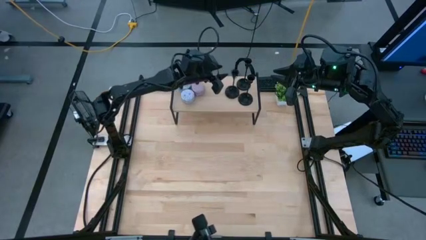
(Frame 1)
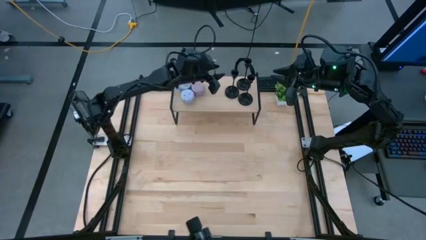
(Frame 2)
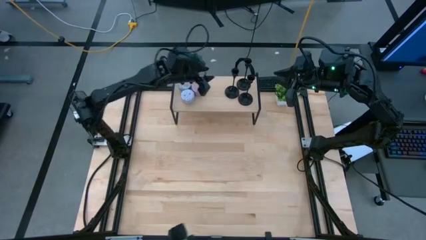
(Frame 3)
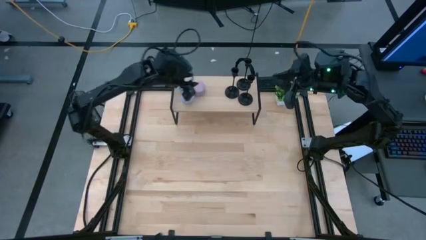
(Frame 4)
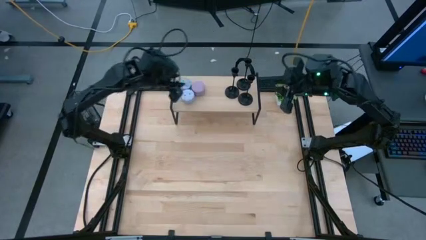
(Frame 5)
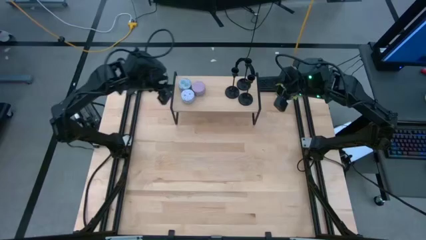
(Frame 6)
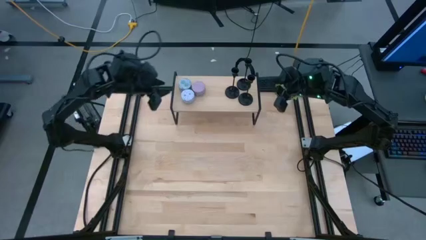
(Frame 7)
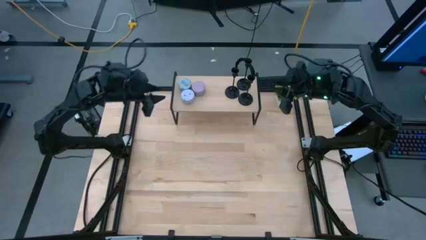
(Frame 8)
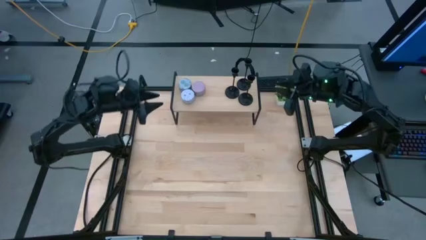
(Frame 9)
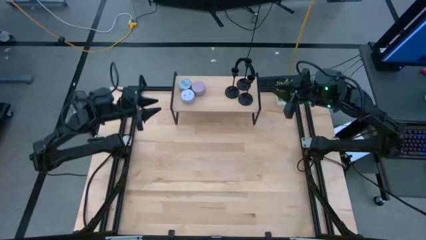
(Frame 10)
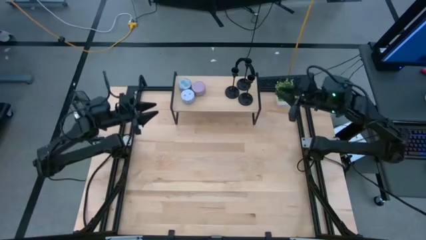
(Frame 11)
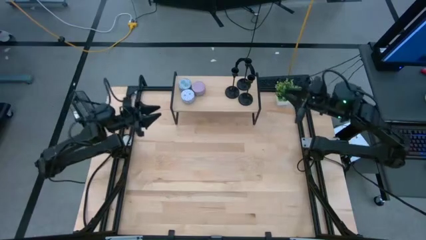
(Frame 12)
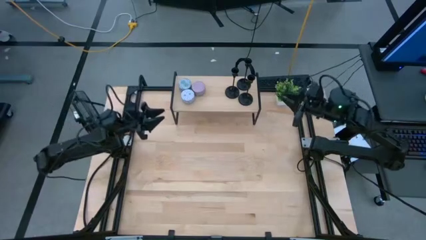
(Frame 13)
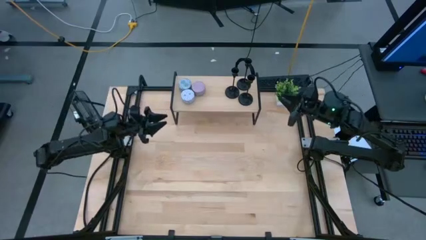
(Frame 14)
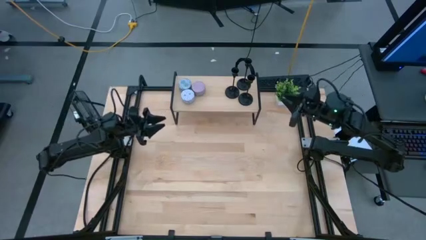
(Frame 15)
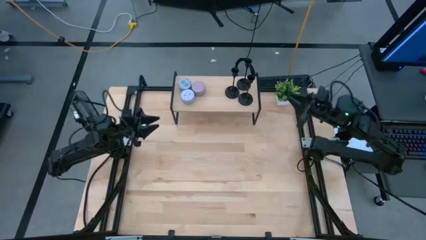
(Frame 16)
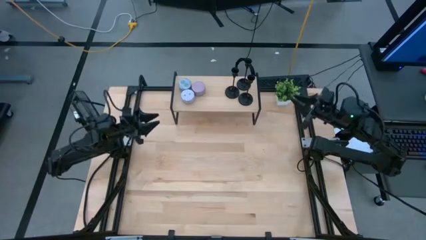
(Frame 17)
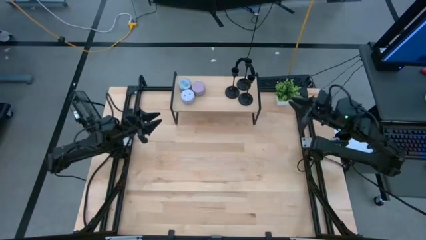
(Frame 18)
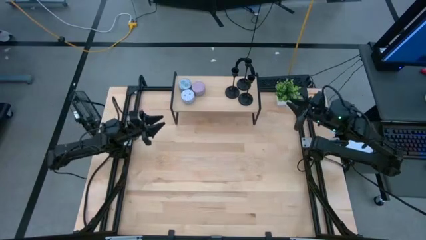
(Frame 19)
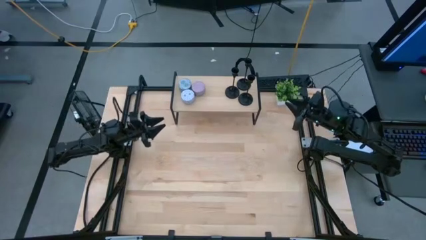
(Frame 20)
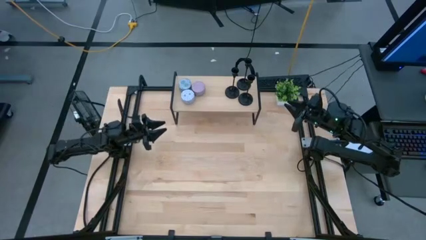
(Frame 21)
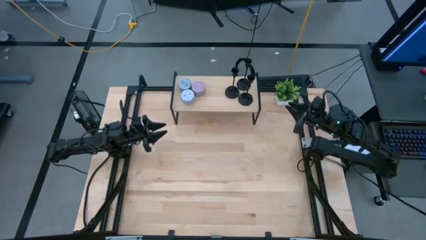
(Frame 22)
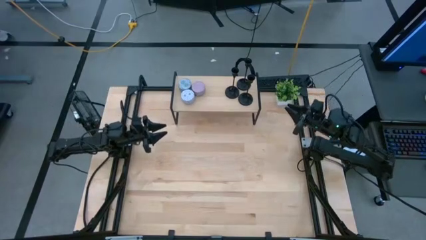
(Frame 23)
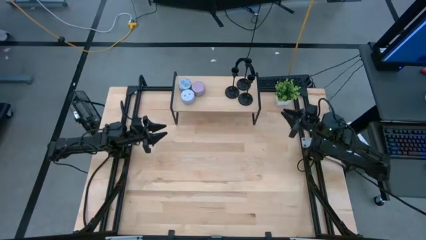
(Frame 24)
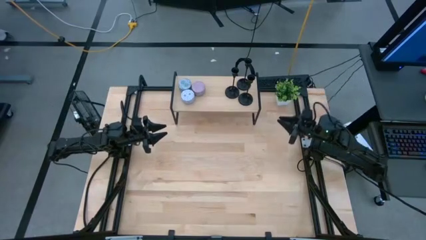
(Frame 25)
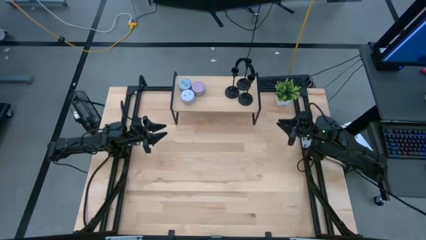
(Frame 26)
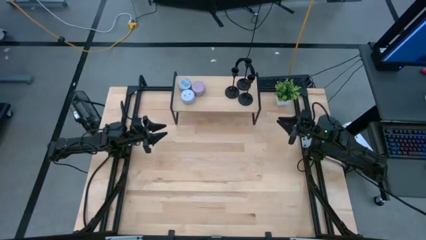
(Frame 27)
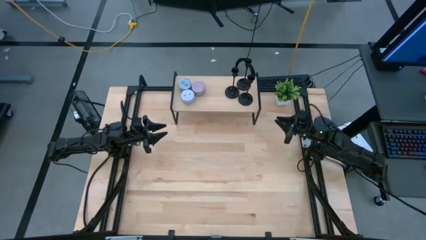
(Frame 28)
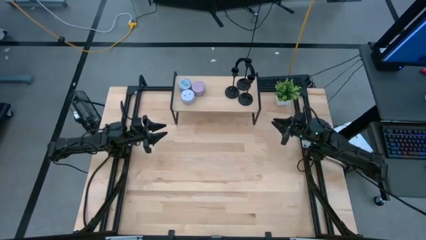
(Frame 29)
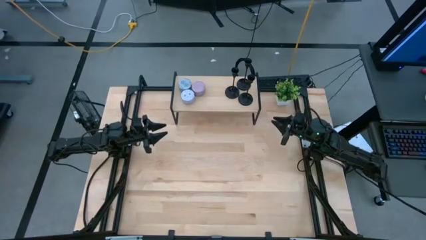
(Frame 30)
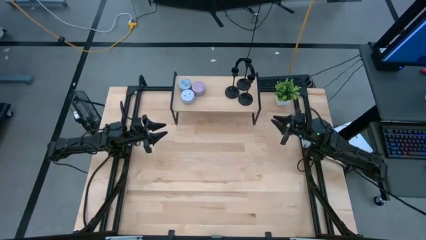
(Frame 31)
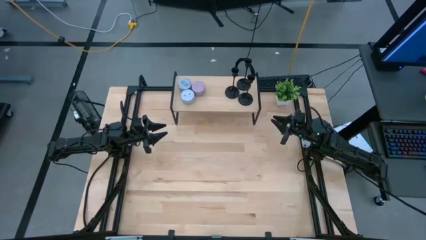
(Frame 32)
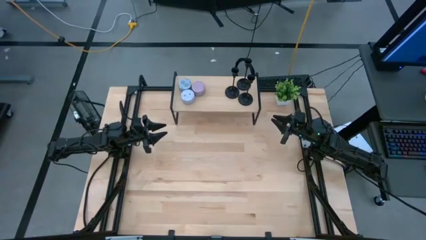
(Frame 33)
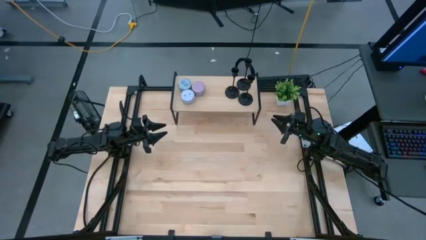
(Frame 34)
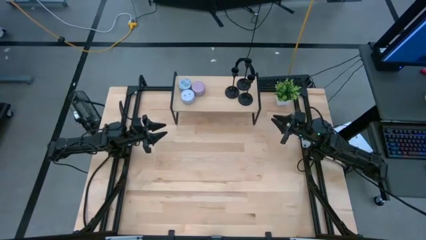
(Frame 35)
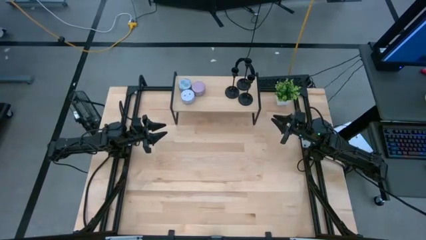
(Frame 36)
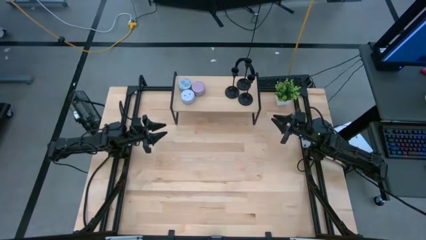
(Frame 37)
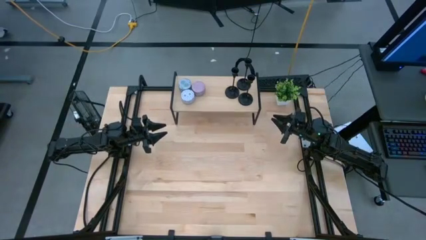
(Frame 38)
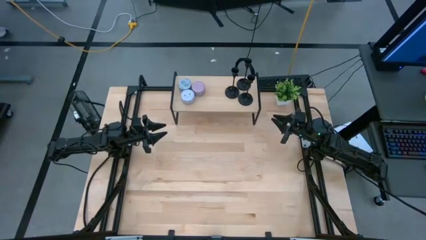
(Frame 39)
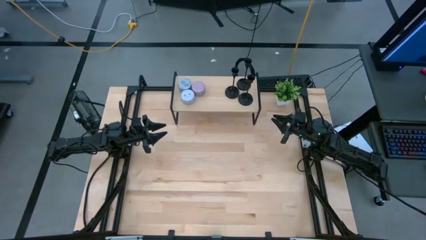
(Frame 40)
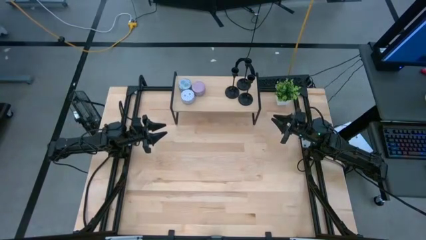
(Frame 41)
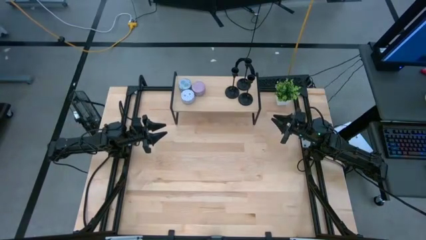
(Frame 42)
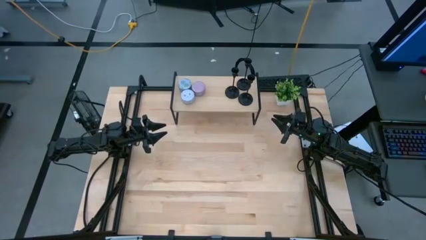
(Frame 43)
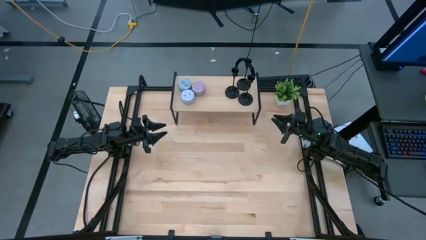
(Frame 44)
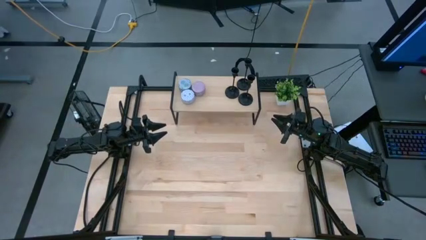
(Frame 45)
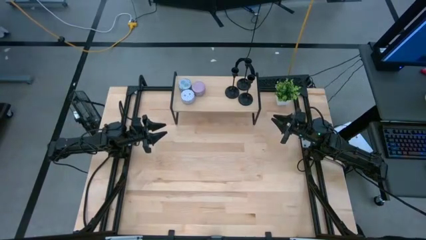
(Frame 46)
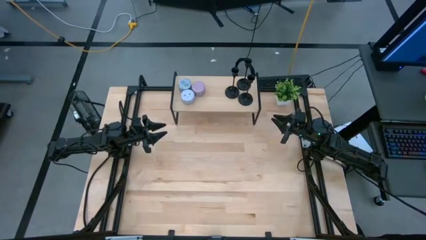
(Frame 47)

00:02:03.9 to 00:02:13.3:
Task: Pick & Place candle stick holders
Return to Home Position

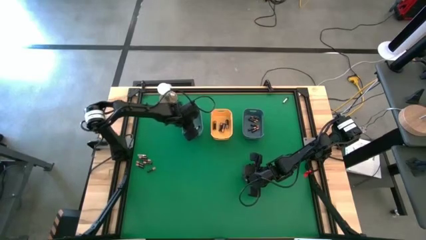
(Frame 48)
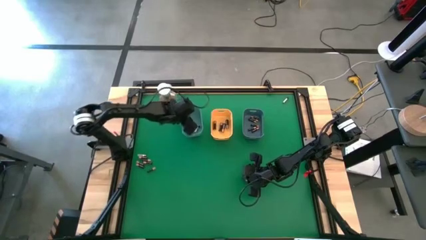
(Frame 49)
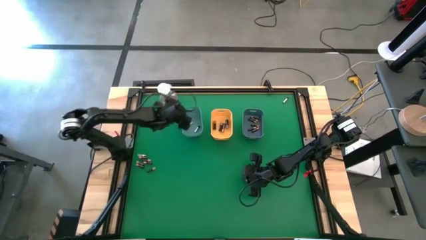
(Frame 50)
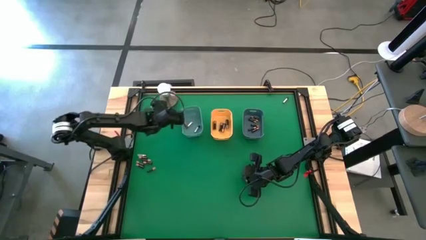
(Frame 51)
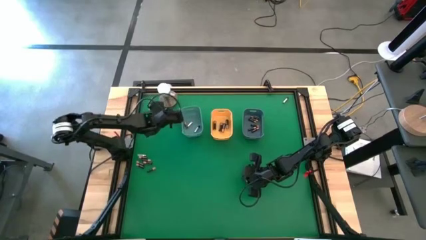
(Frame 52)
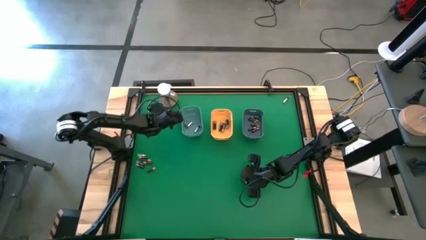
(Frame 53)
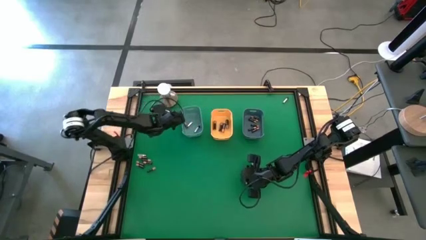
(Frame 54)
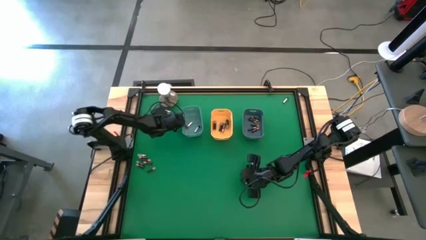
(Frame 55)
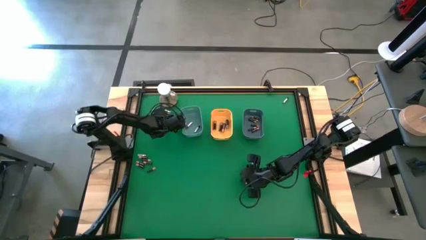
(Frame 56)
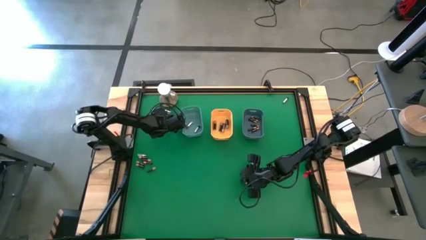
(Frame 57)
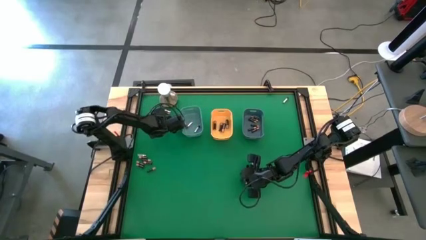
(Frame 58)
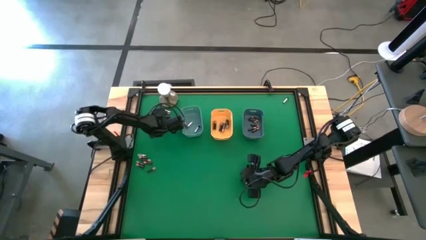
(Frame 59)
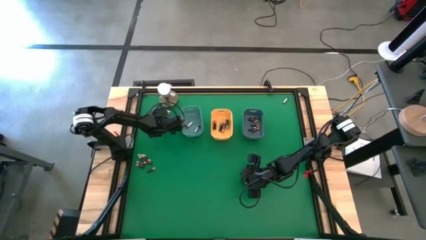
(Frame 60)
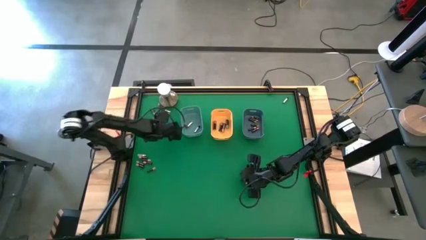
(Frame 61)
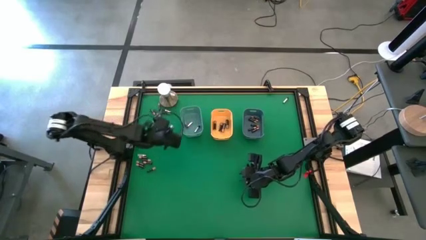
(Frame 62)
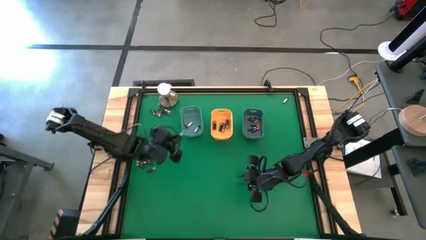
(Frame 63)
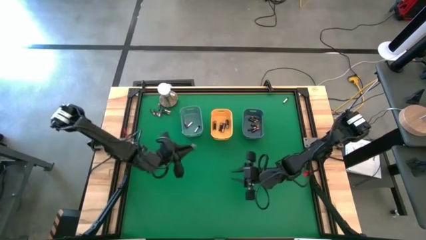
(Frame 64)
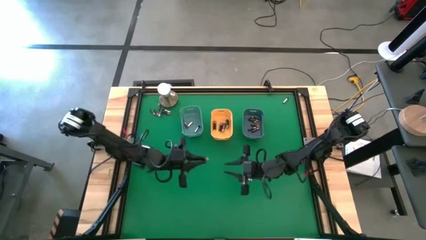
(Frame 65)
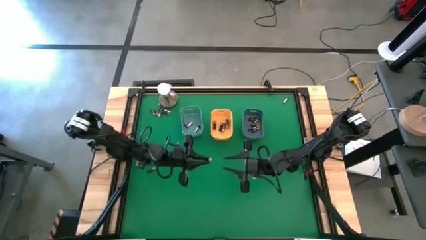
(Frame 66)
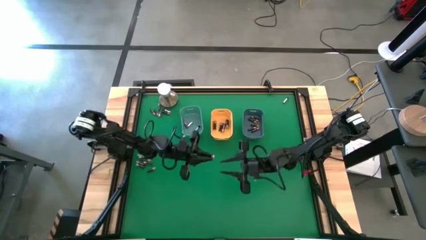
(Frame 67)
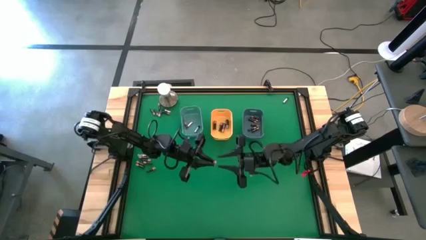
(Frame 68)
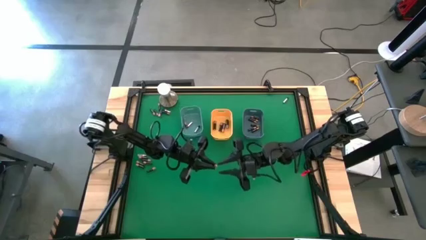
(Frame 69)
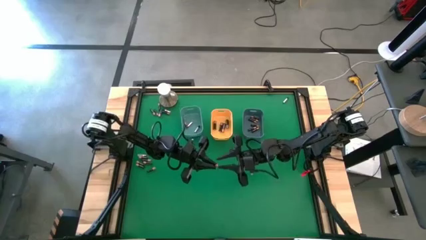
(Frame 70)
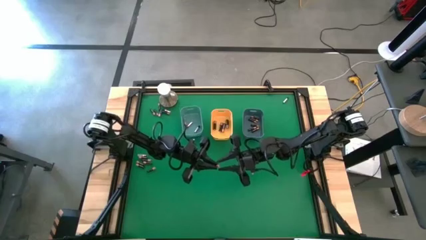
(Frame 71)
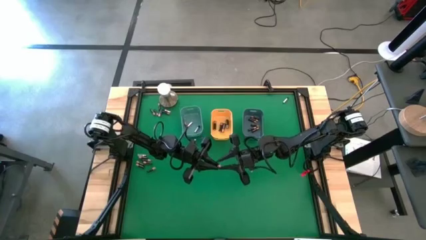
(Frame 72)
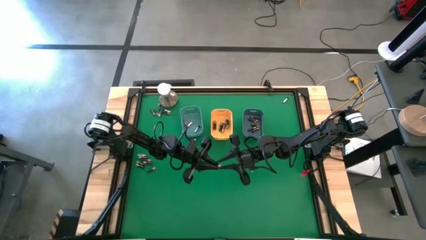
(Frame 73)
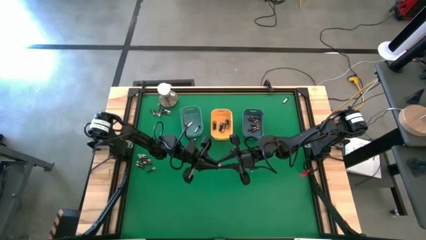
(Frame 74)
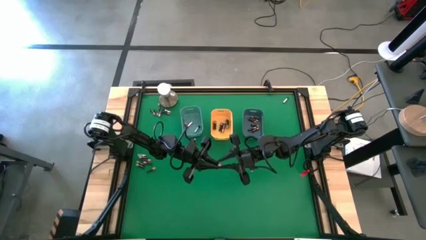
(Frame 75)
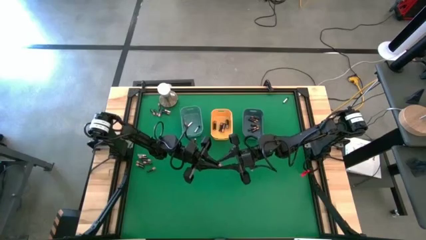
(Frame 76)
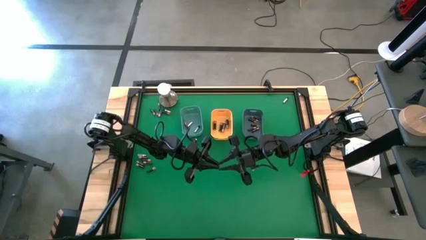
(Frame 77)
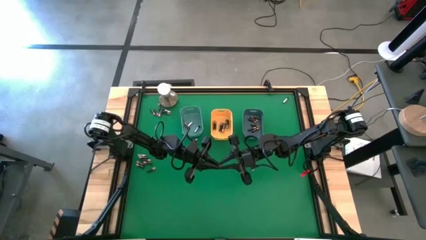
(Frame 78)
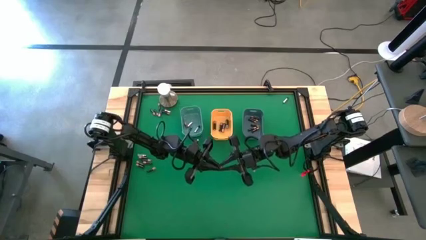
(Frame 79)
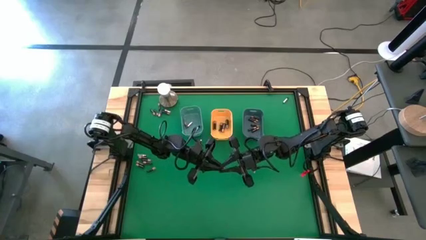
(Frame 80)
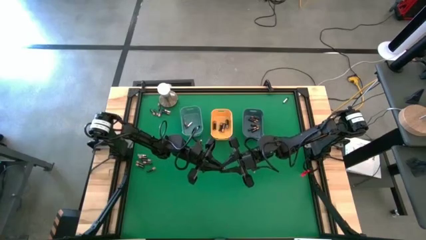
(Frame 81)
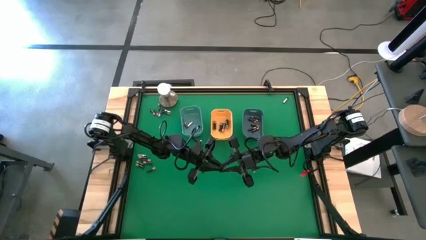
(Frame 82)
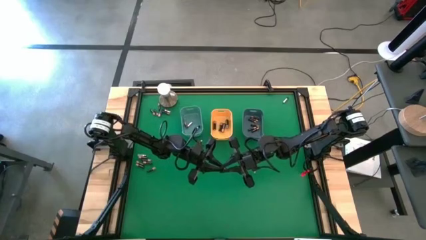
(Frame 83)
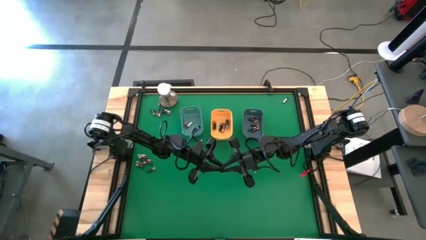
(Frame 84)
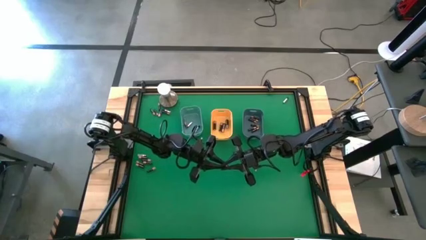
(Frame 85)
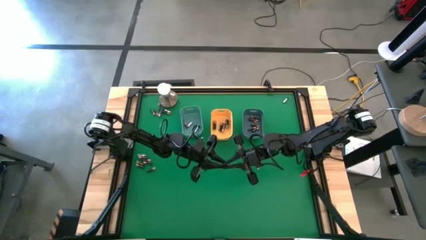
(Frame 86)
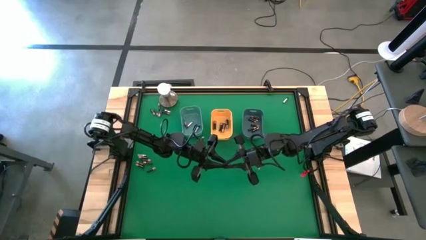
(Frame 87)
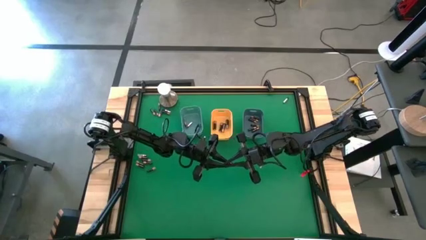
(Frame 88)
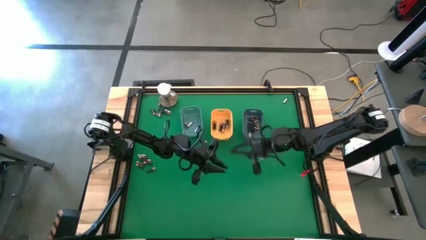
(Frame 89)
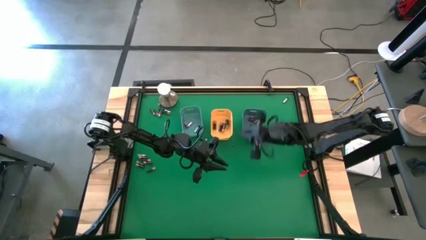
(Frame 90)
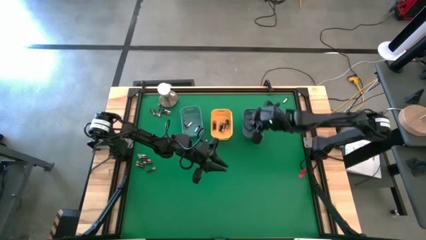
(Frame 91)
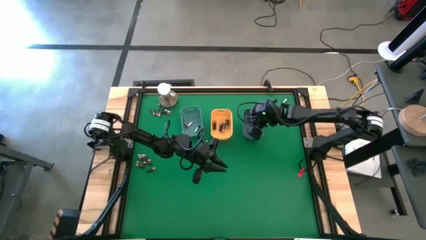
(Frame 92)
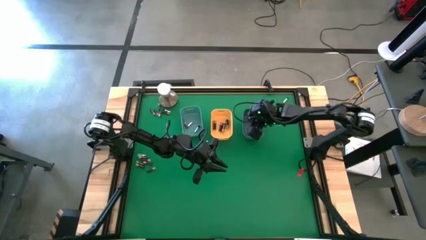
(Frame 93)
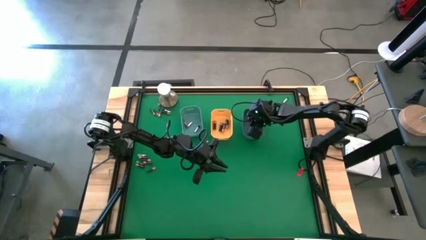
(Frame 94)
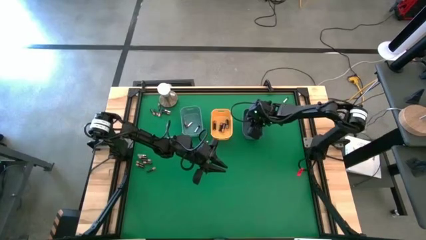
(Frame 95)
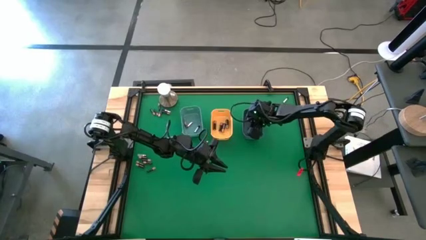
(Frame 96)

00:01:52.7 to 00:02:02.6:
Task: Sort batteries
Put the small black battery into the blue bin
